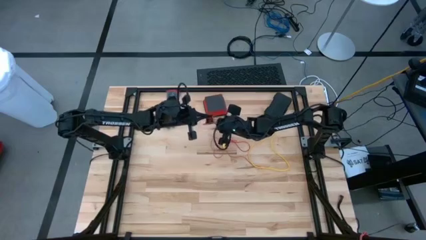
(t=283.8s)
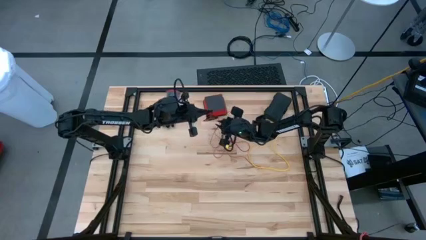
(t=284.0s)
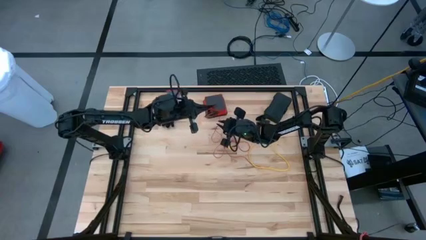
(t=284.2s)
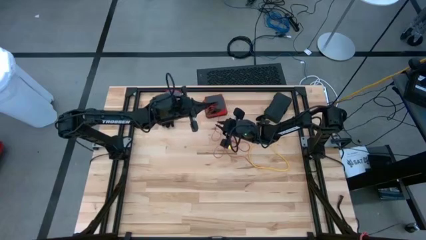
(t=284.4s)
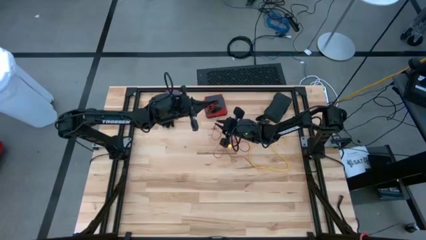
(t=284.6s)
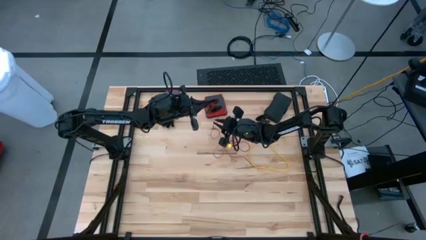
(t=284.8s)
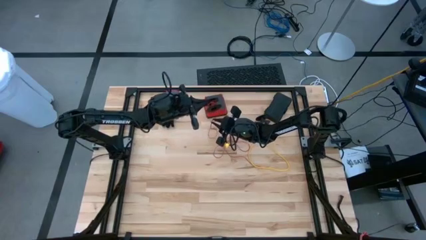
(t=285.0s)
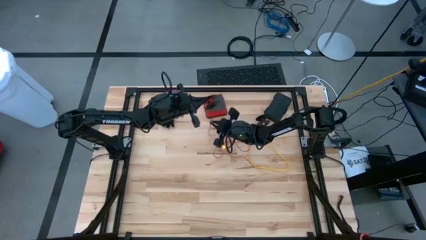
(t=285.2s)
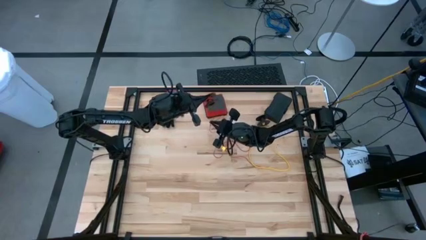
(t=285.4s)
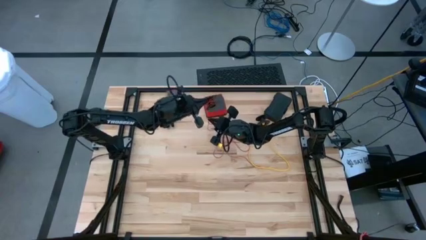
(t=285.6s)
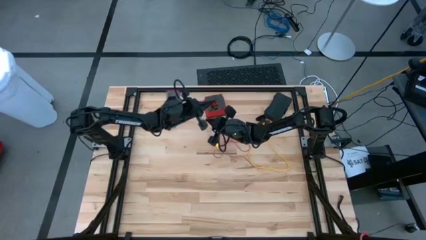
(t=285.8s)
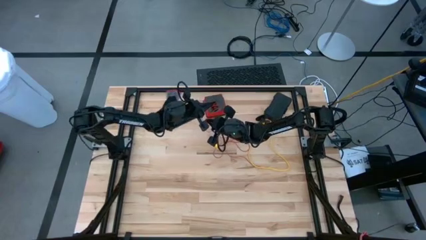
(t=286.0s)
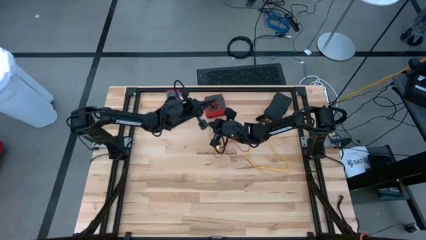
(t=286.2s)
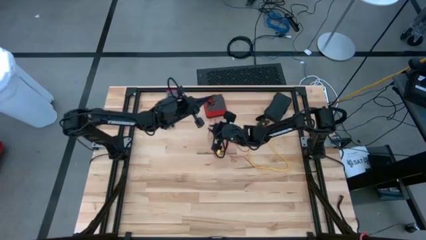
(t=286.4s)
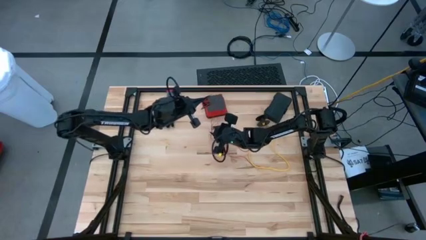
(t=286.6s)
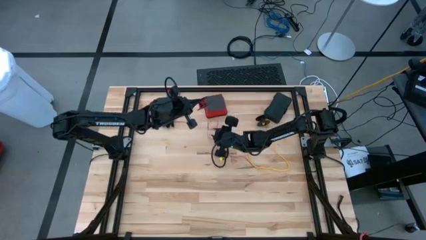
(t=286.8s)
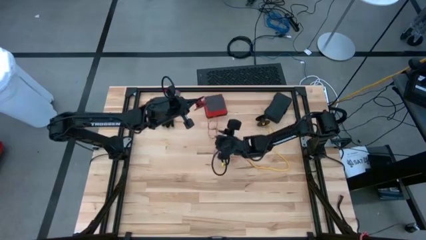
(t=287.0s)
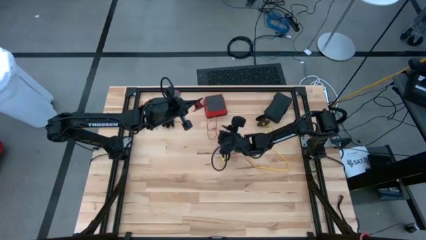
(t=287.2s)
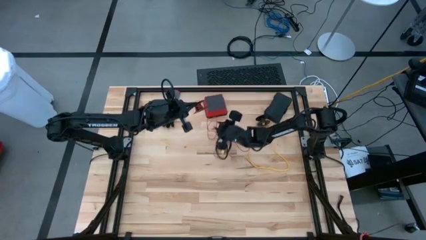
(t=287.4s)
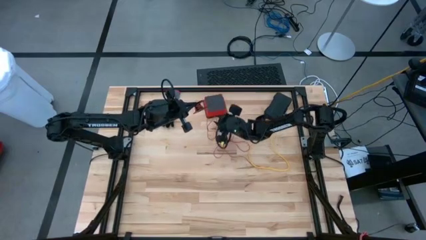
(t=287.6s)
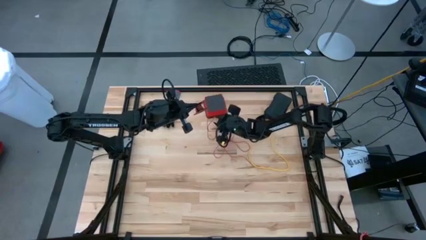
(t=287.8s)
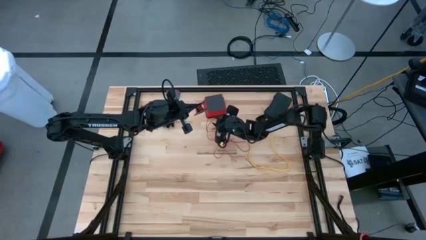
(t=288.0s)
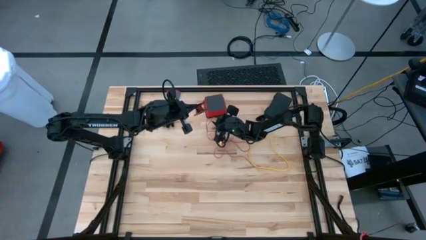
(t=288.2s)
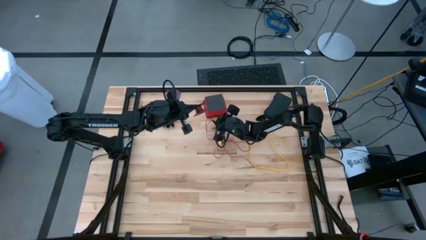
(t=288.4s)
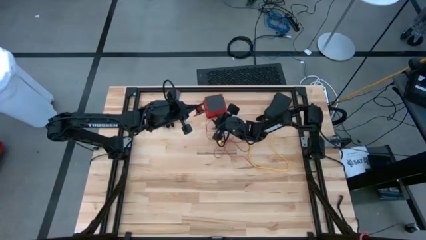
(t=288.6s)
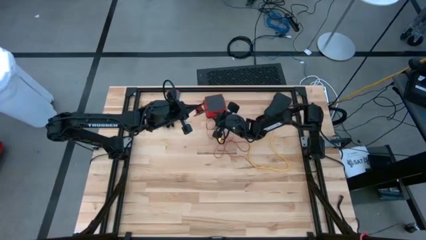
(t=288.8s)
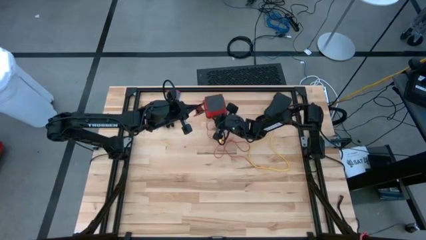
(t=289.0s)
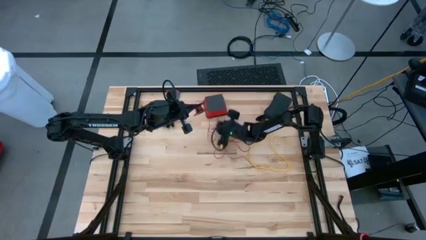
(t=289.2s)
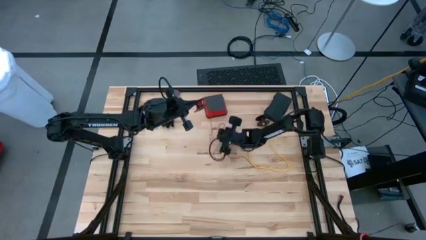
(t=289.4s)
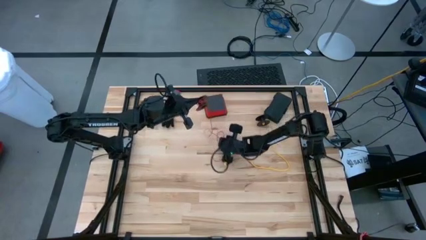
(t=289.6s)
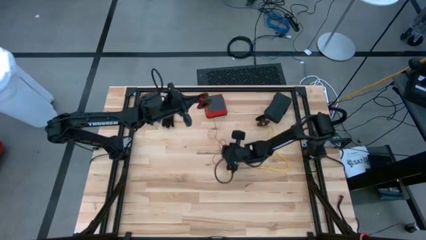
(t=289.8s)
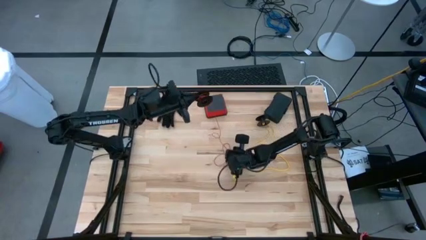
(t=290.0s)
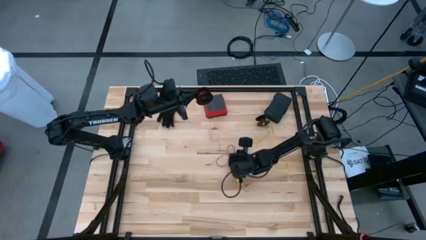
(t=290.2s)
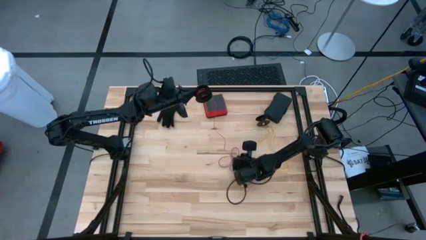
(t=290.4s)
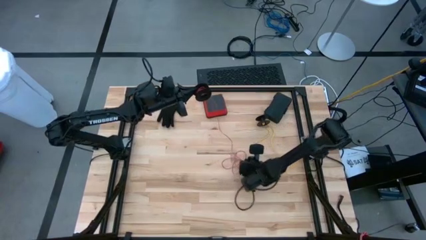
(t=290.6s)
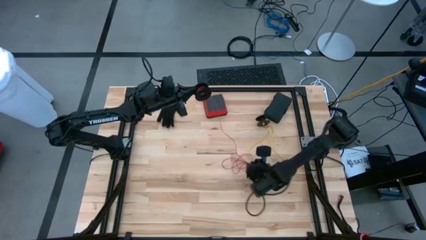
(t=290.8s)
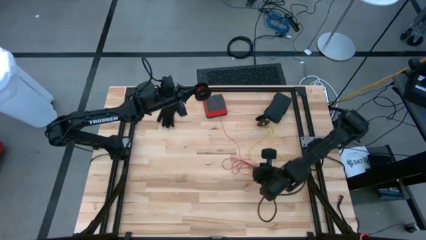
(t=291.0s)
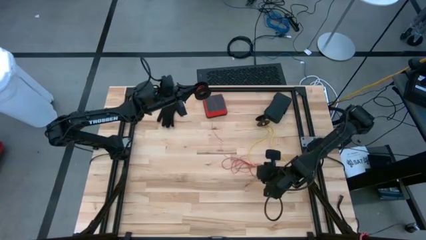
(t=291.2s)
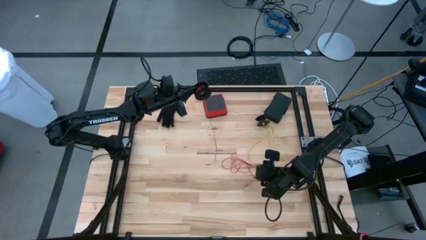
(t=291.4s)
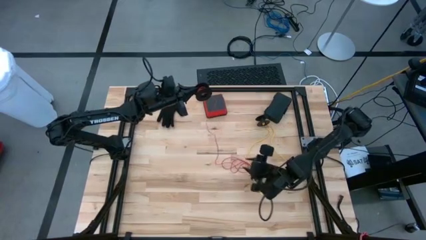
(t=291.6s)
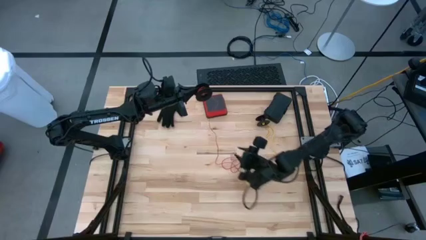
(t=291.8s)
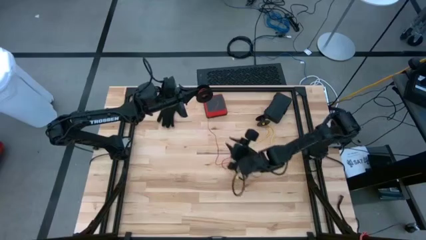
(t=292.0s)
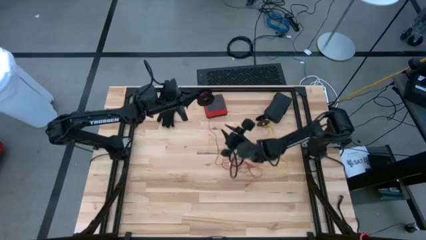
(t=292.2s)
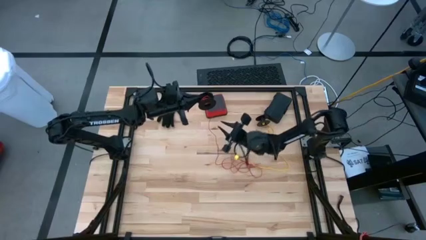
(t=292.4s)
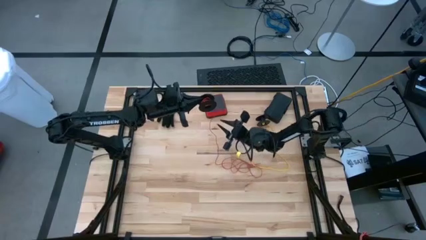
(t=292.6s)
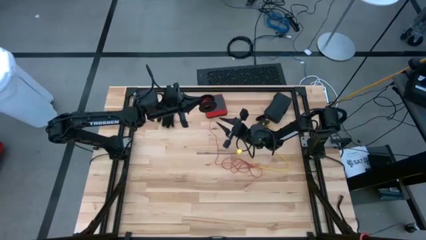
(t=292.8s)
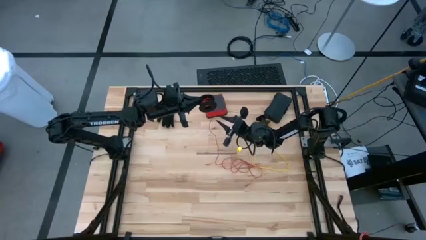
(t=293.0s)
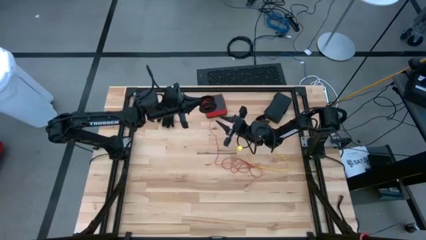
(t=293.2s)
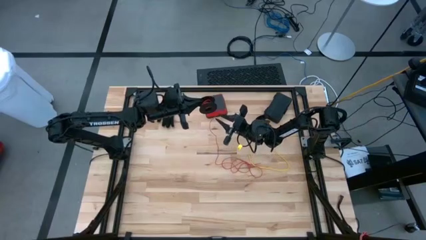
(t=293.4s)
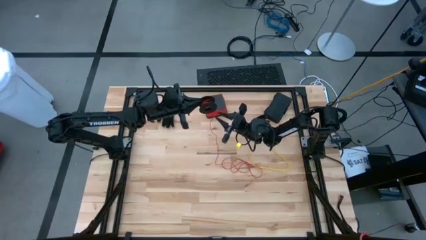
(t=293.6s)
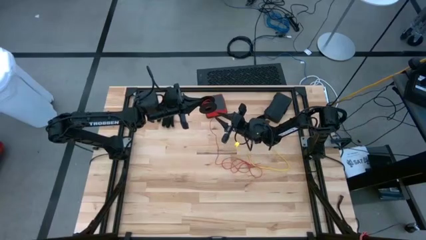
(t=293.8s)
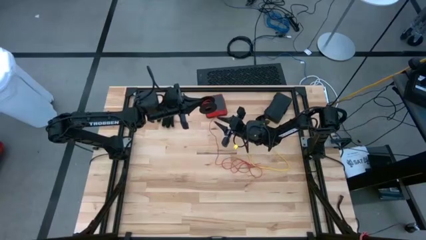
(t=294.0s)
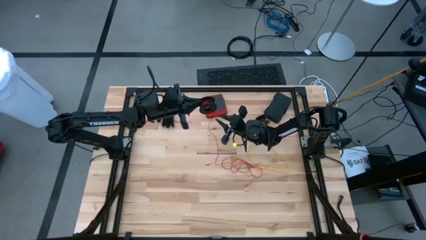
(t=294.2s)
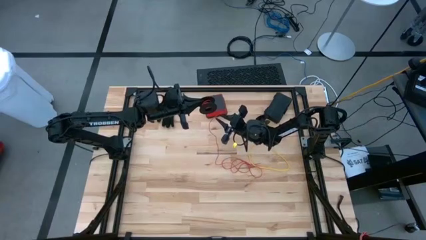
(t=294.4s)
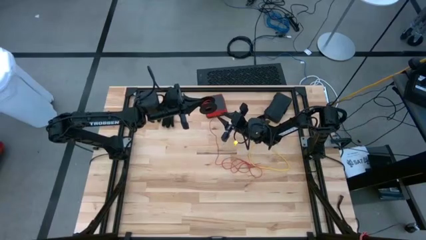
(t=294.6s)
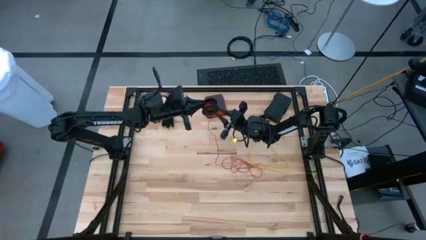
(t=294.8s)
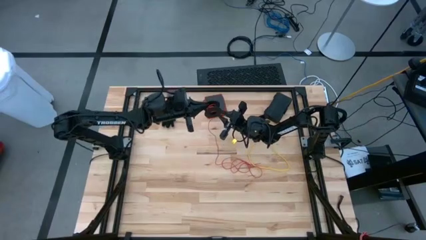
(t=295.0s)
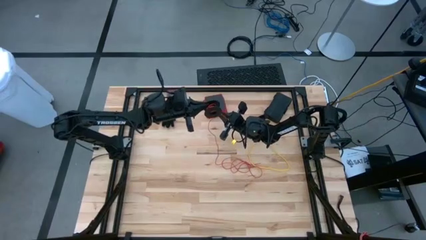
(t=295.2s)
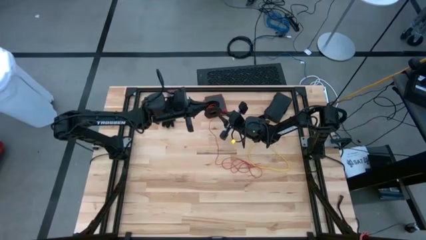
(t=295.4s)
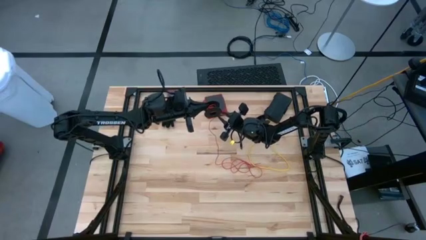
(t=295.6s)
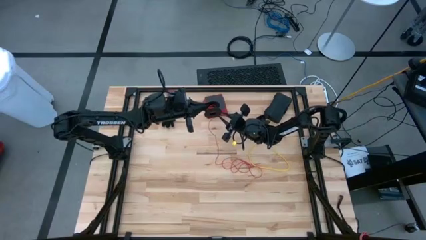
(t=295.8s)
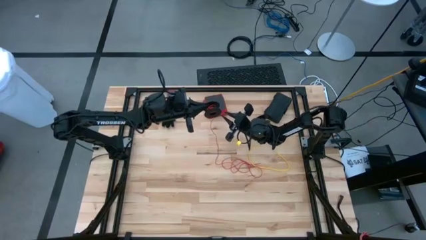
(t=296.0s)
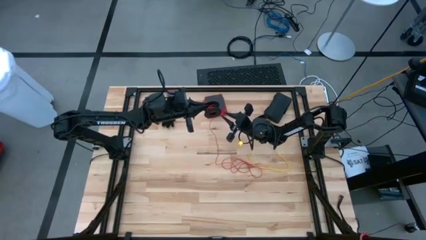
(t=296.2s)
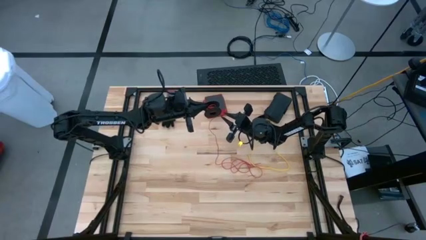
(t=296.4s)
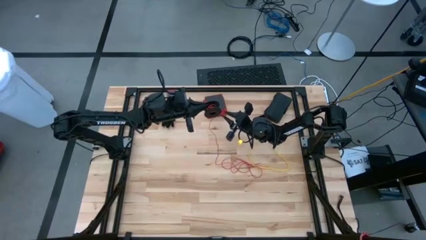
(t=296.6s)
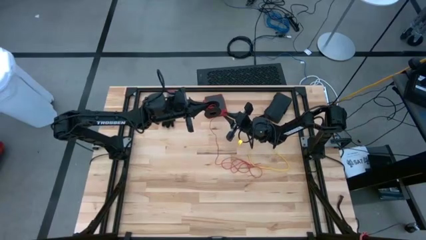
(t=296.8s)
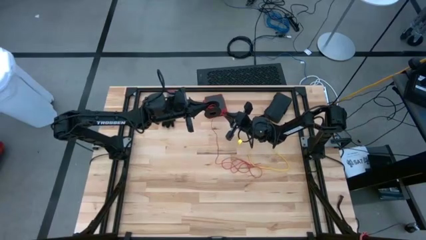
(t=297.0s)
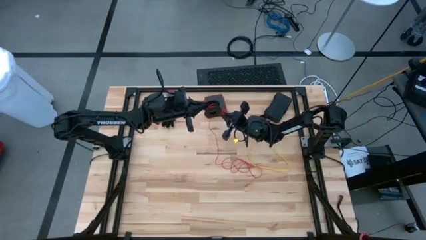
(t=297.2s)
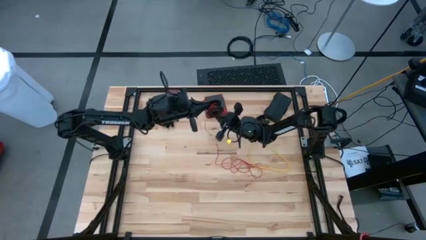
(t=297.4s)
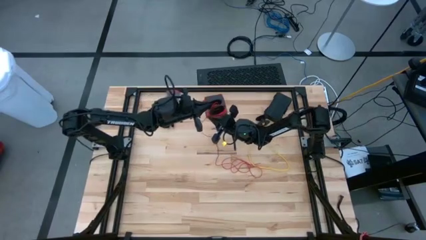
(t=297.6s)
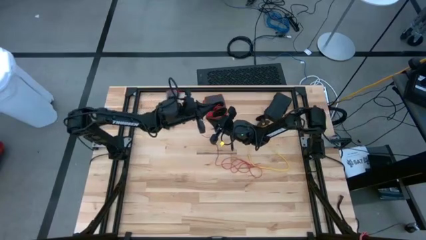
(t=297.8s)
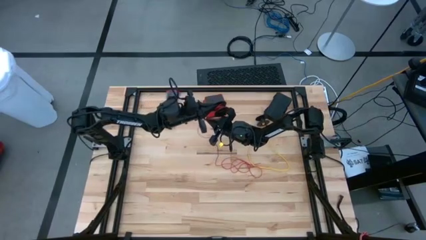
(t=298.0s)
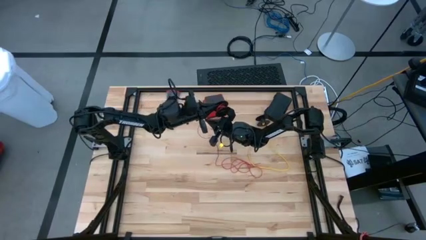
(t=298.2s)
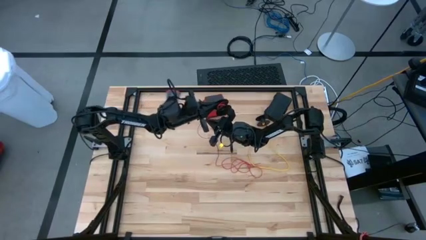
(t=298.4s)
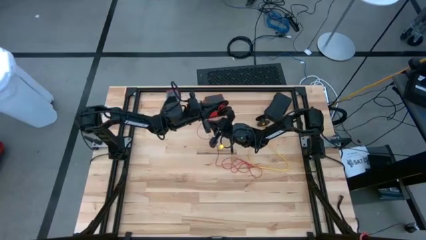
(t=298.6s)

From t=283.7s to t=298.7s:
Task: Coil cords
Coil the red wire onto the spool
